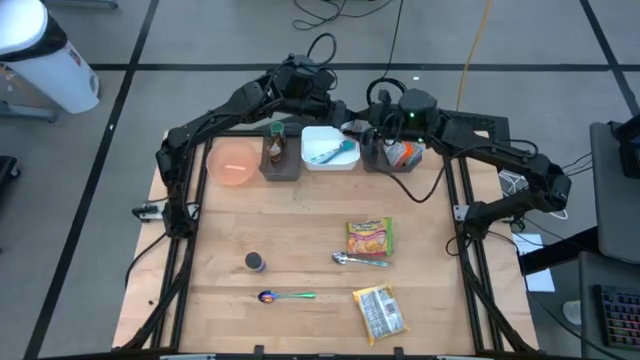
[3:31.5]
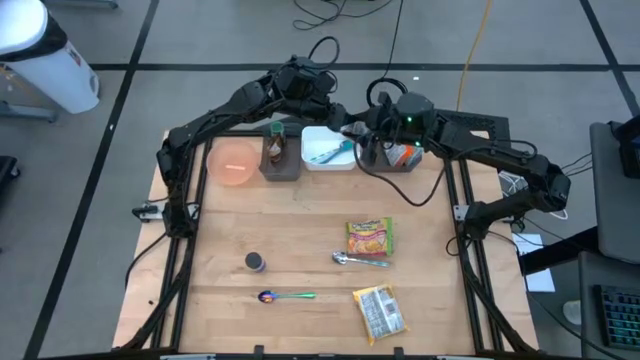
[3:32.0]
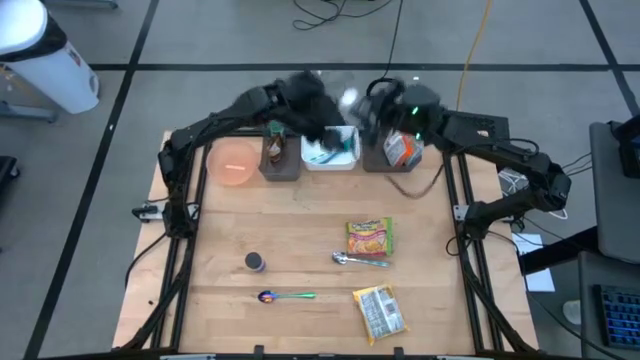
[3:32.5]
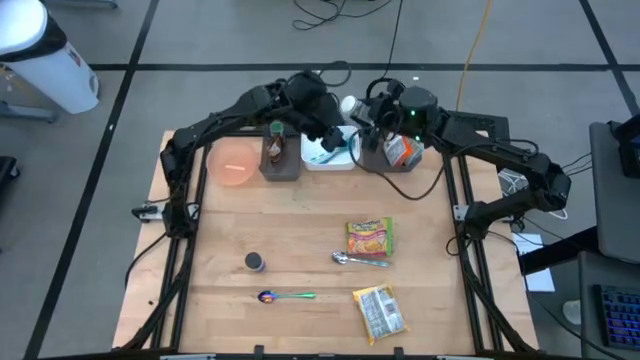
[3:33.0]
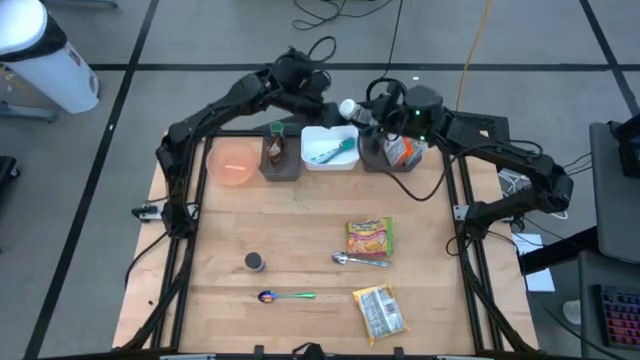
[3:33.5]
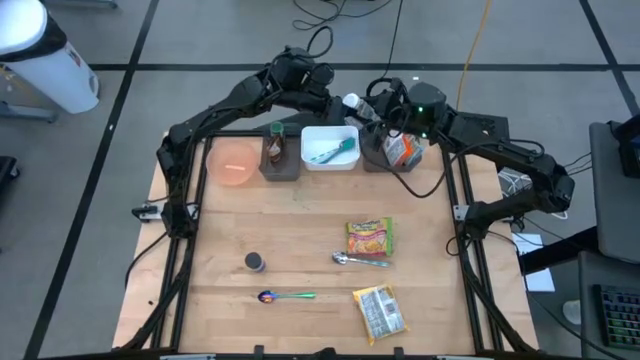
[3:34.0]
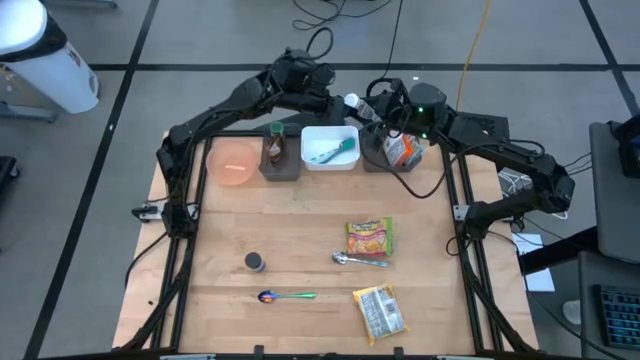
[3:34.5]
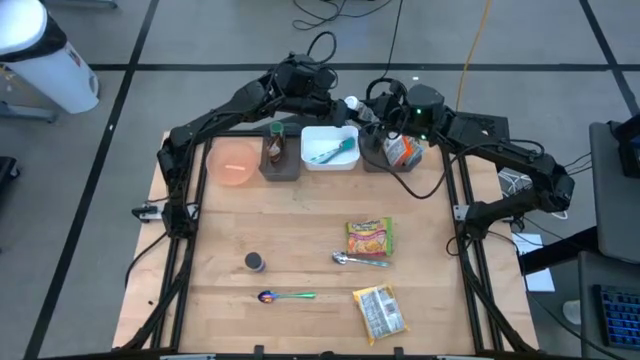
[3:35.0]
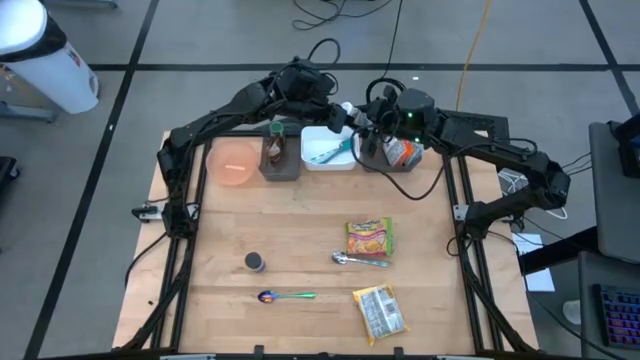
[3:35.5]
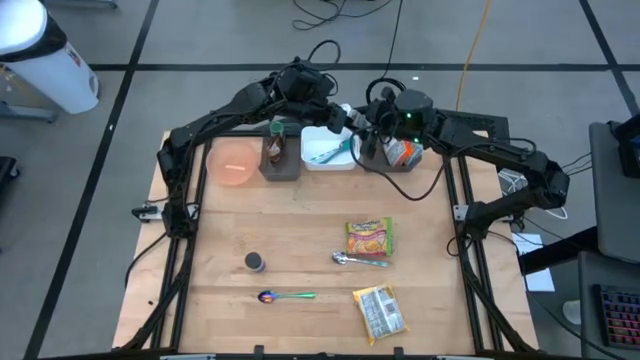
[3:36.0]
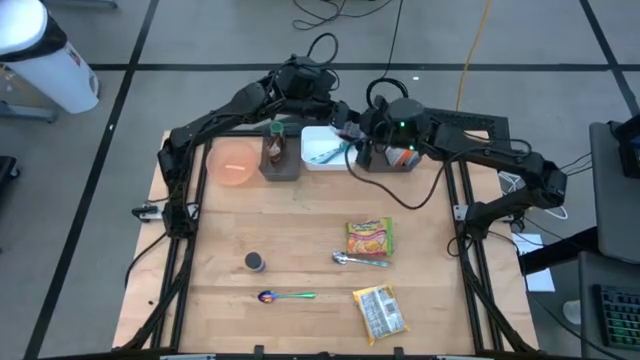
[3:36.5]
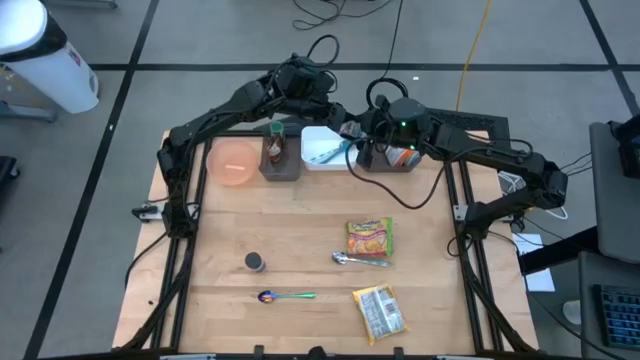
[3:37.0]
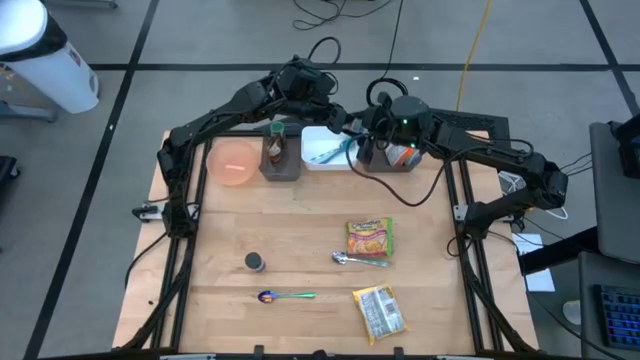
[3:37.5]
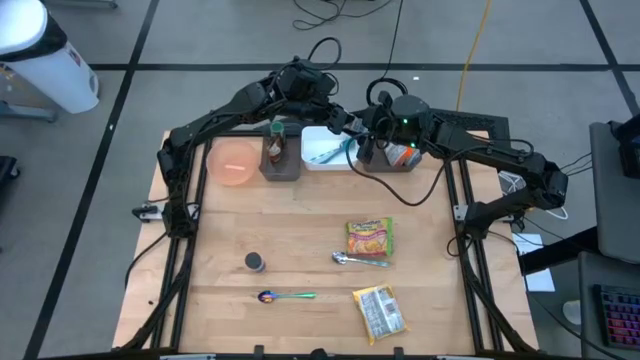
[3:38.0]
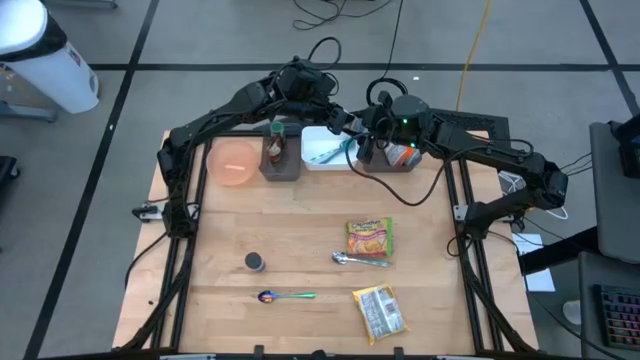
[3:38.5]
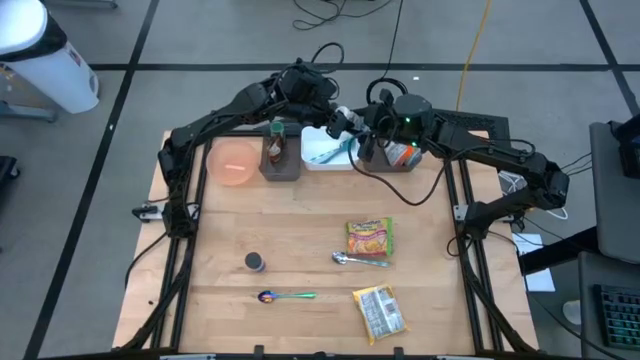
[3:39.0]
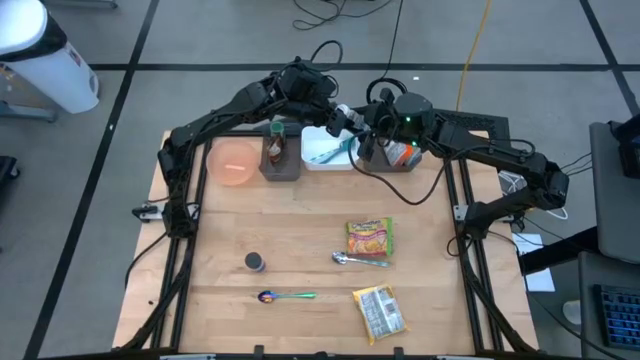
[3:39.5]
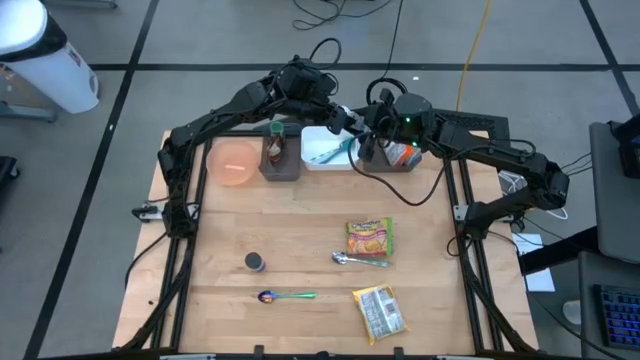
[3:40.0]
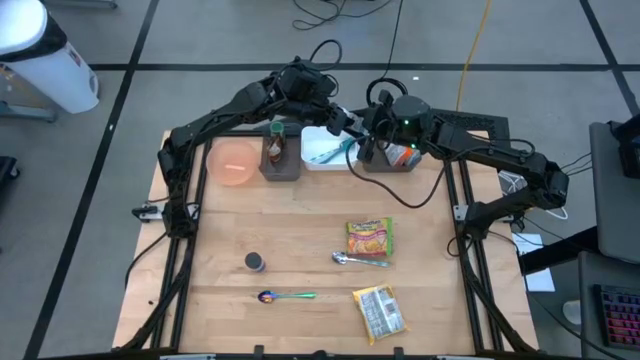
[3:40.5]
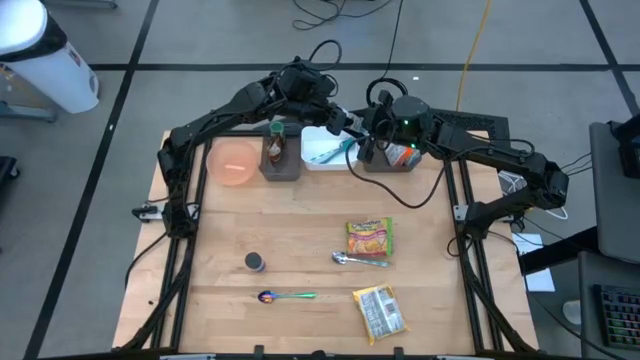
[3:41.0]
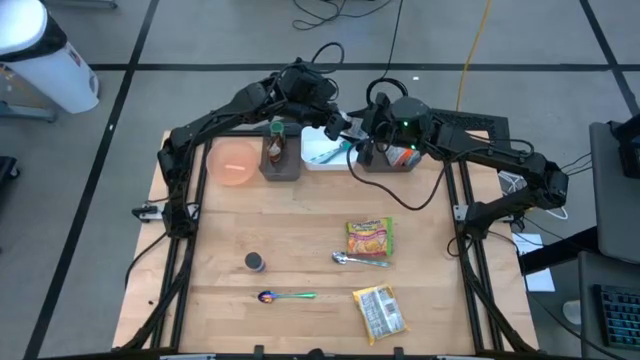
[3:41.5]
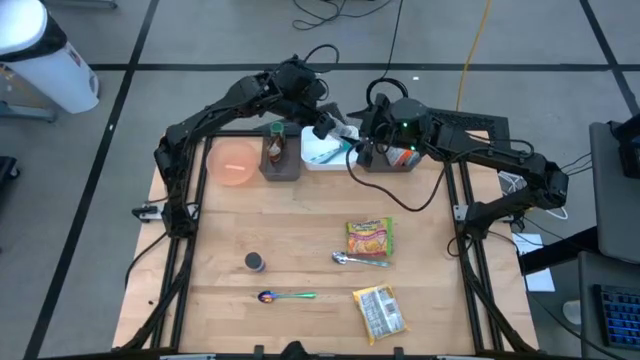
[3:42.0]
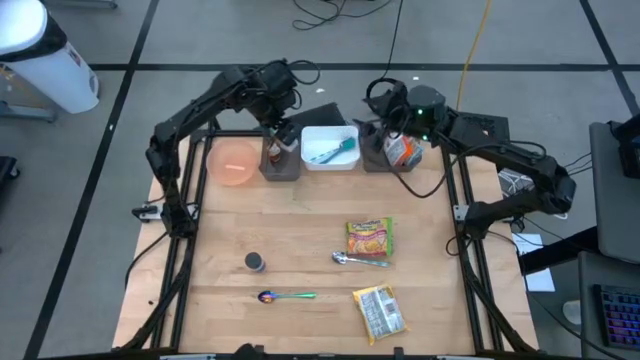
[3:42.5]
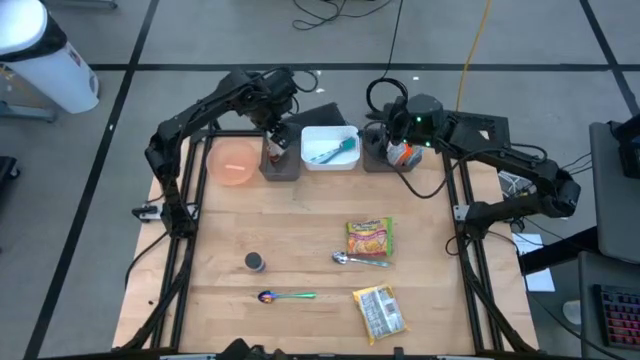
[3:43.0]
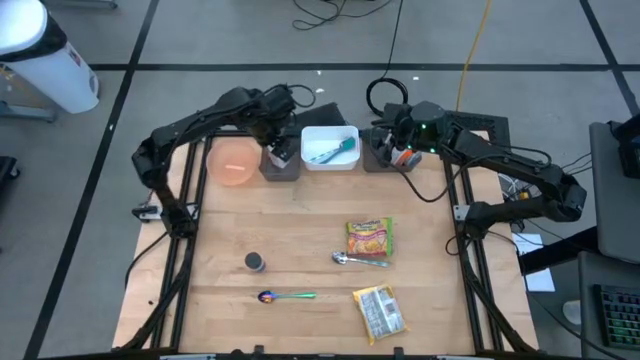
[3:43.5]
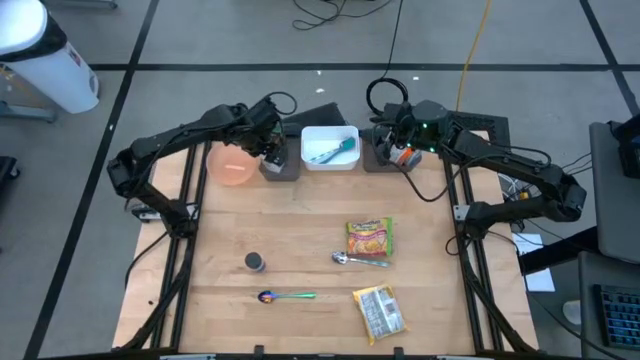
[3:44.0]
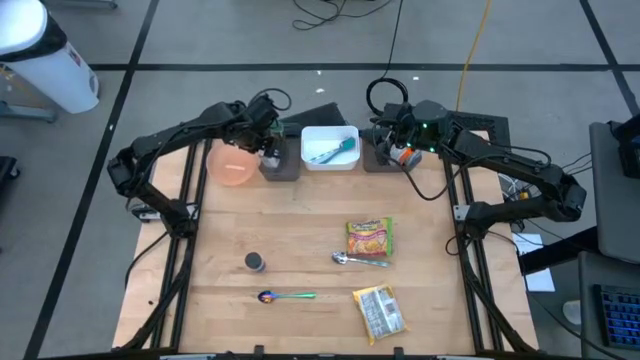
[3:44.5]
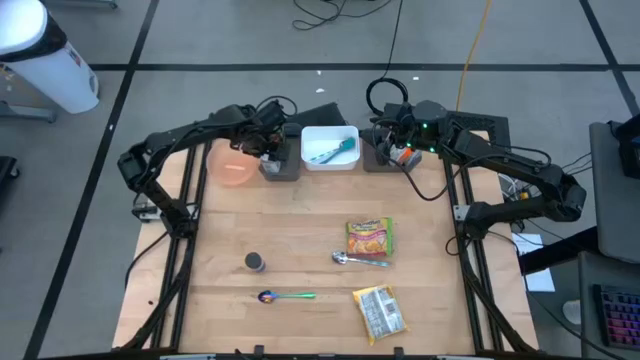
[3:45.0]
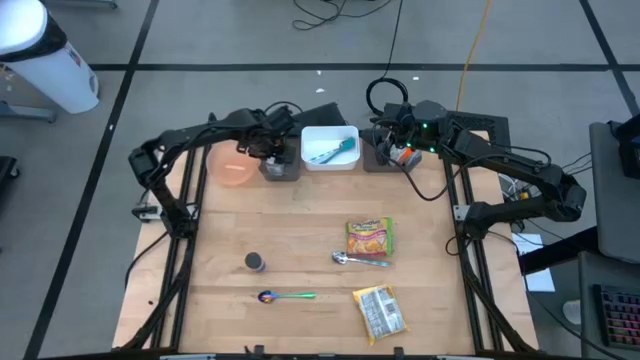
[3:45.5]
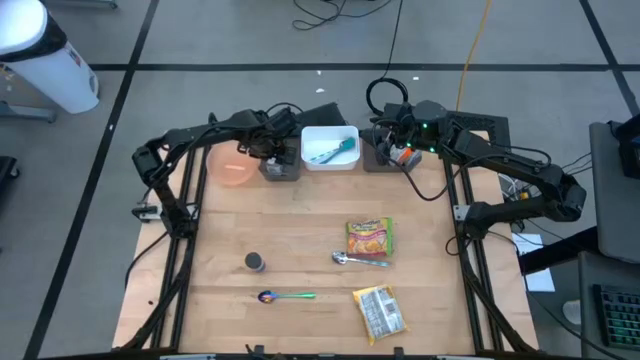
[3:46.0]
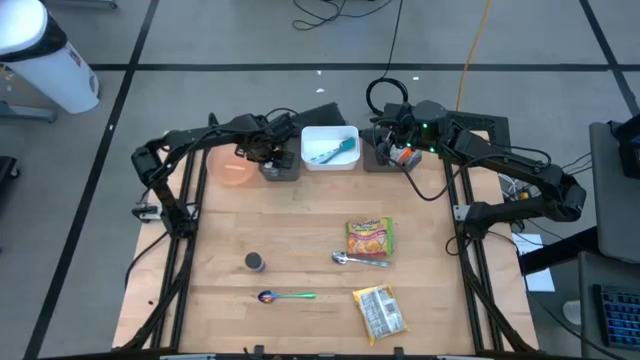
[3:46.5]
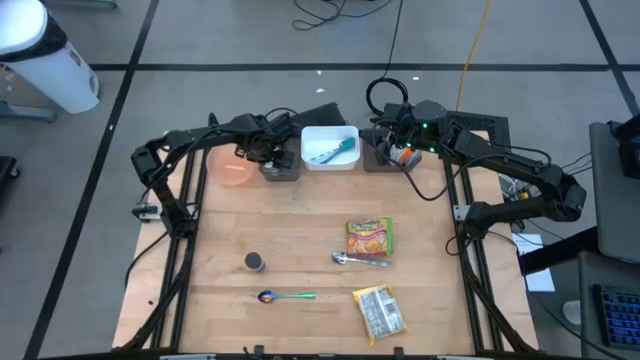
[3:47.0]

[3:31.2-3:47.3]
Task: Pick & Place Food Item
Put the white seasoning bottle into the left black bin
